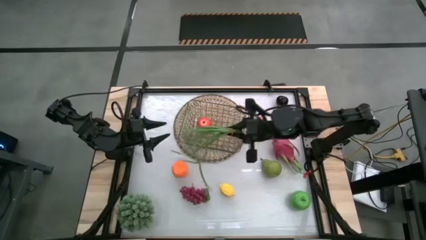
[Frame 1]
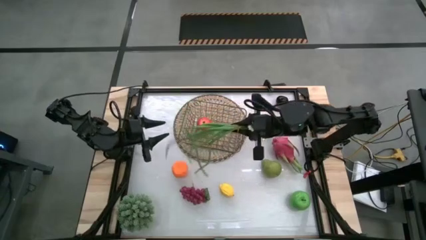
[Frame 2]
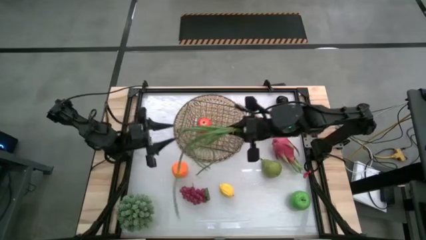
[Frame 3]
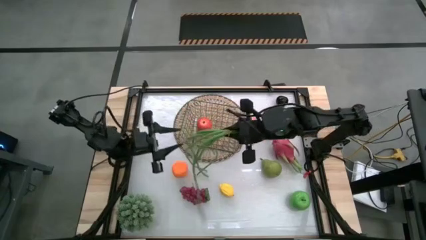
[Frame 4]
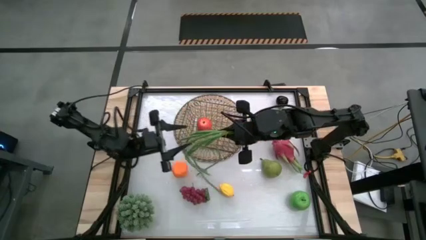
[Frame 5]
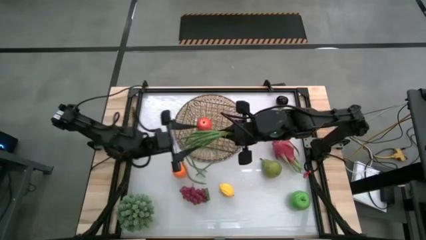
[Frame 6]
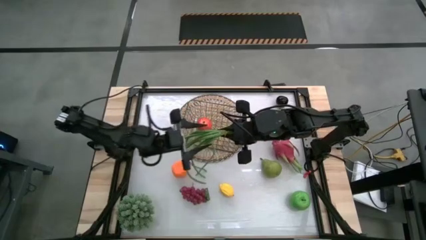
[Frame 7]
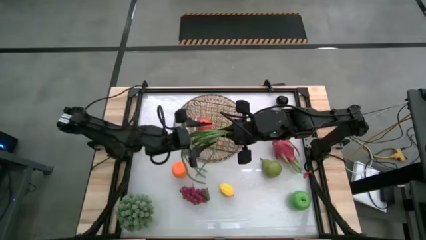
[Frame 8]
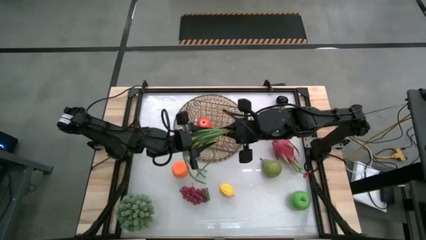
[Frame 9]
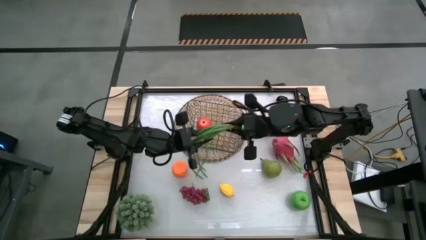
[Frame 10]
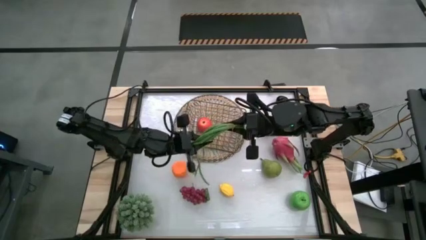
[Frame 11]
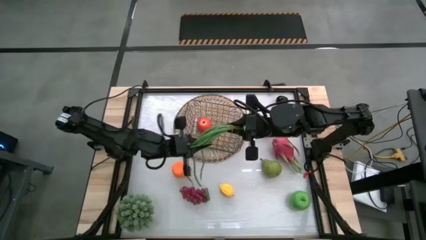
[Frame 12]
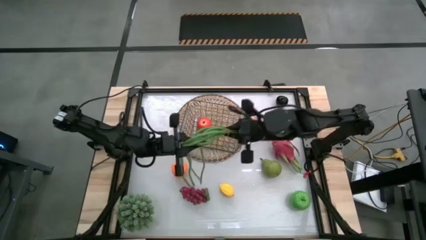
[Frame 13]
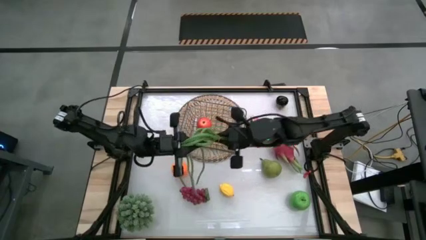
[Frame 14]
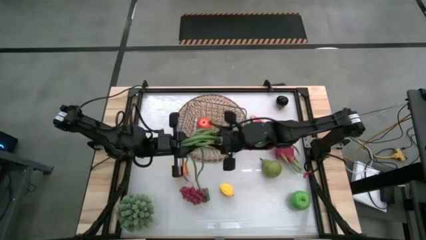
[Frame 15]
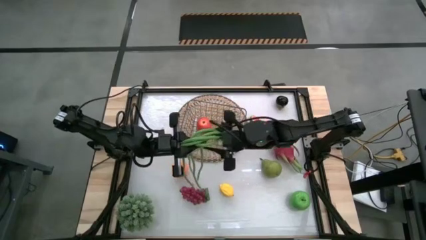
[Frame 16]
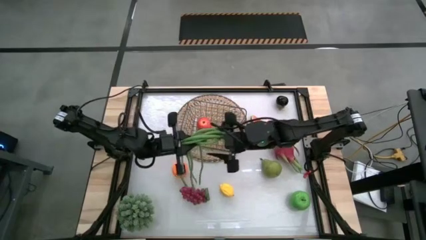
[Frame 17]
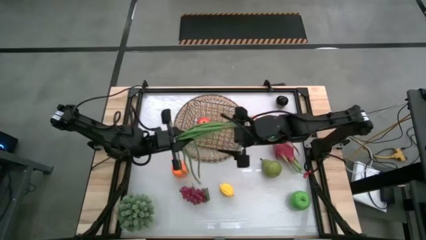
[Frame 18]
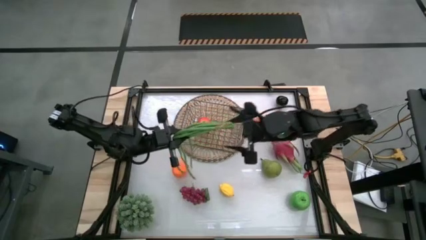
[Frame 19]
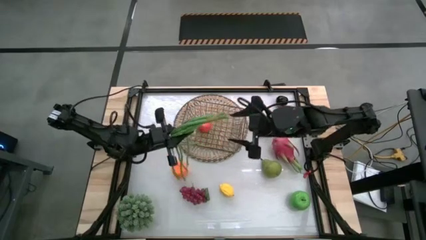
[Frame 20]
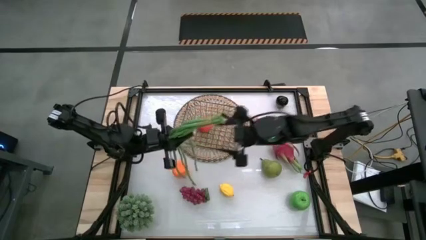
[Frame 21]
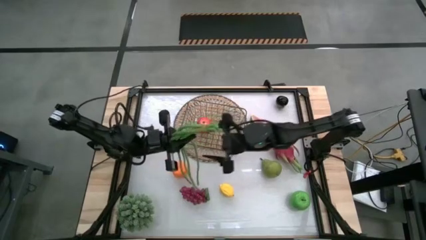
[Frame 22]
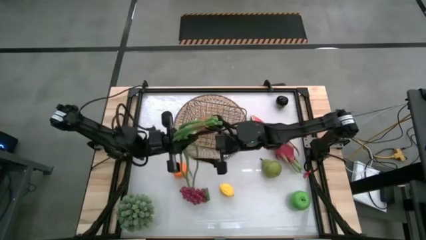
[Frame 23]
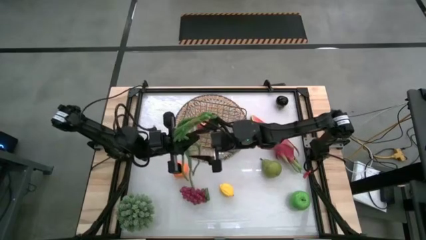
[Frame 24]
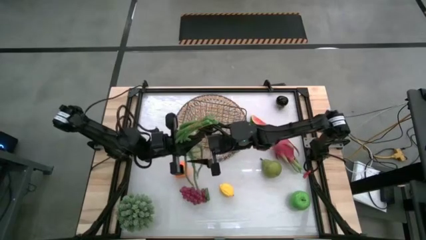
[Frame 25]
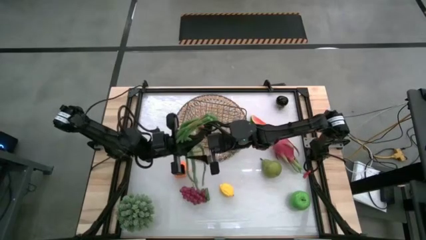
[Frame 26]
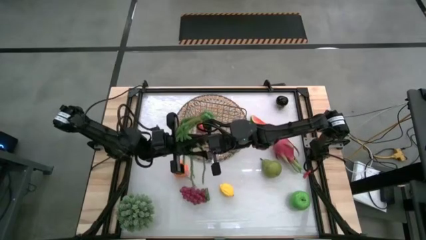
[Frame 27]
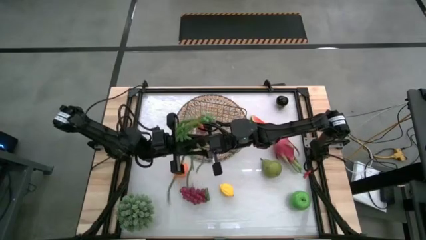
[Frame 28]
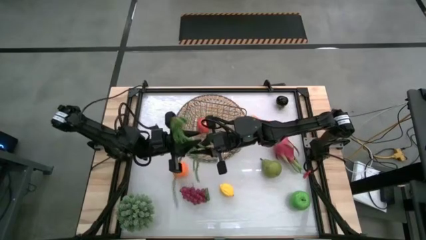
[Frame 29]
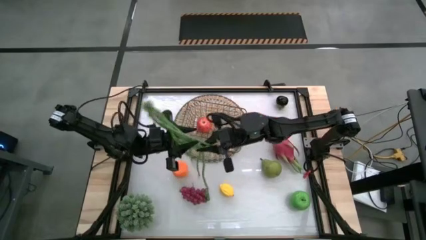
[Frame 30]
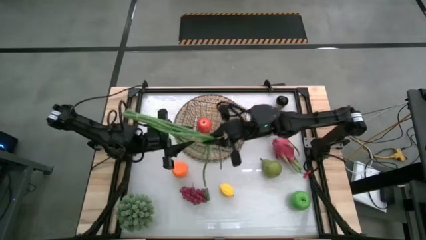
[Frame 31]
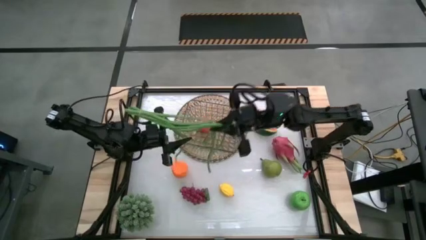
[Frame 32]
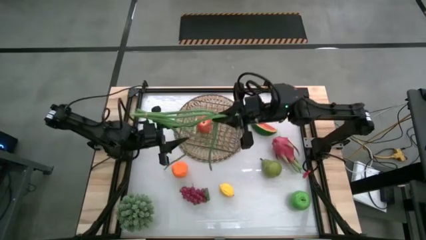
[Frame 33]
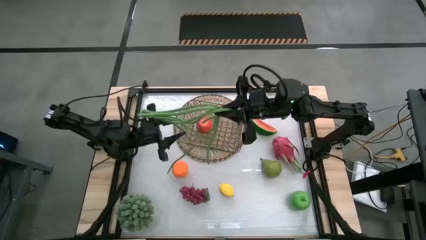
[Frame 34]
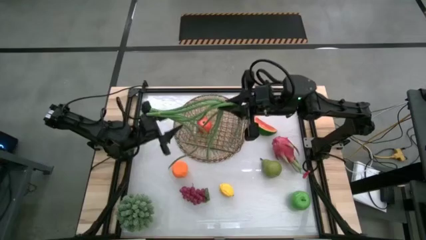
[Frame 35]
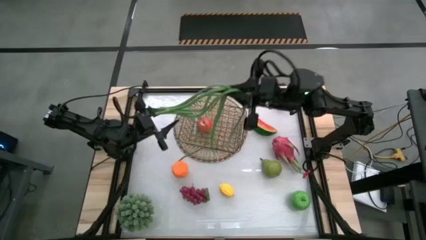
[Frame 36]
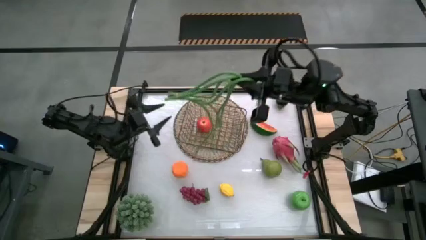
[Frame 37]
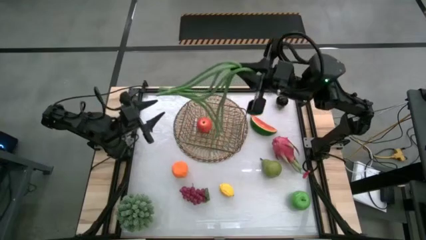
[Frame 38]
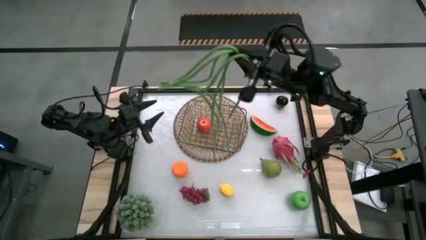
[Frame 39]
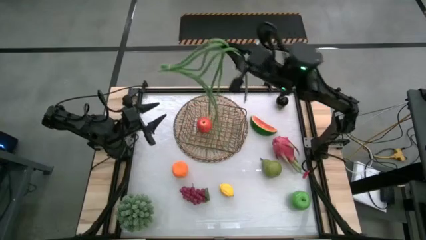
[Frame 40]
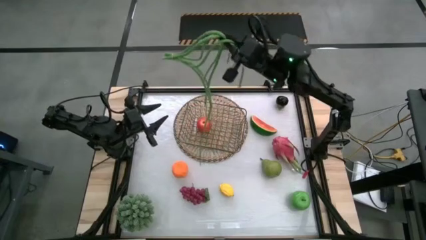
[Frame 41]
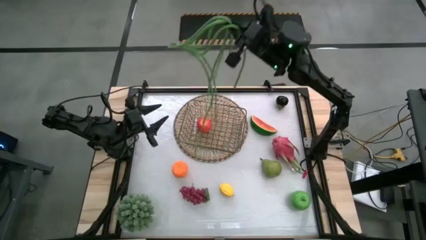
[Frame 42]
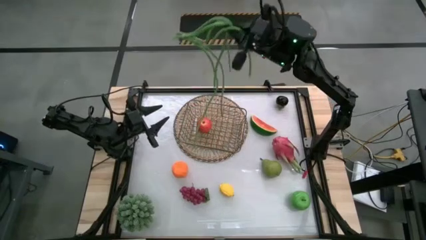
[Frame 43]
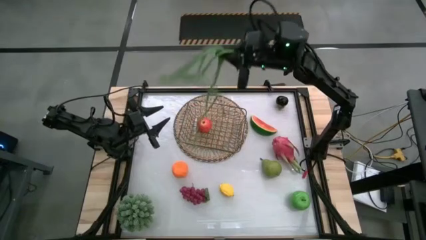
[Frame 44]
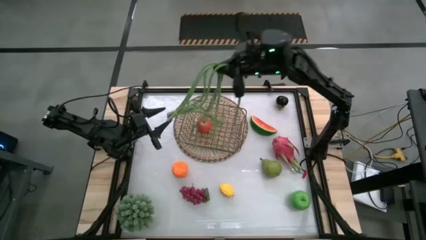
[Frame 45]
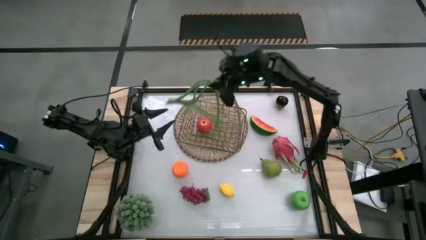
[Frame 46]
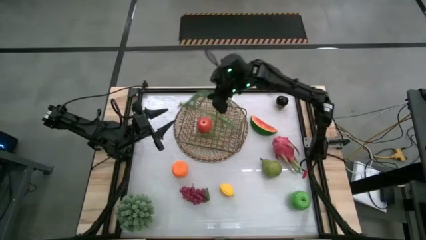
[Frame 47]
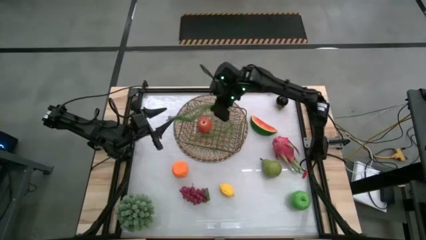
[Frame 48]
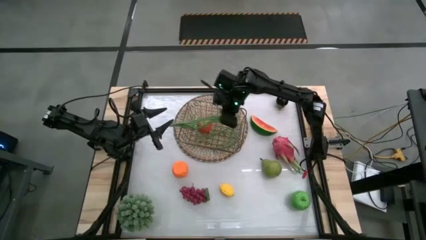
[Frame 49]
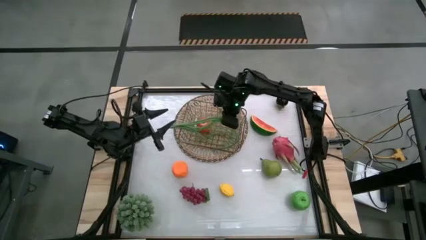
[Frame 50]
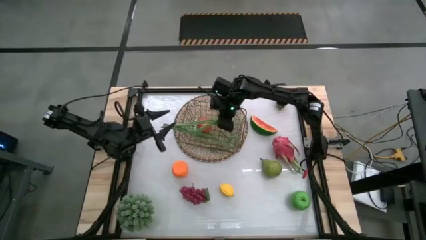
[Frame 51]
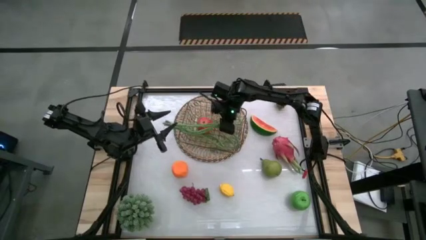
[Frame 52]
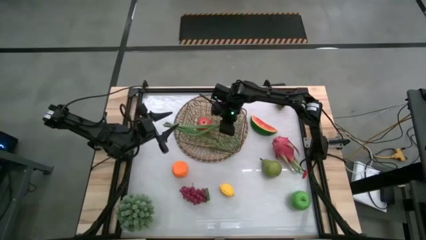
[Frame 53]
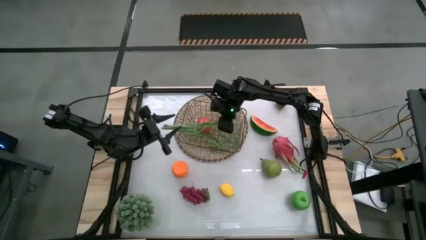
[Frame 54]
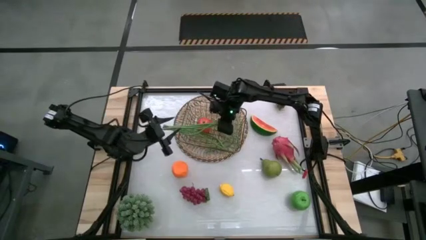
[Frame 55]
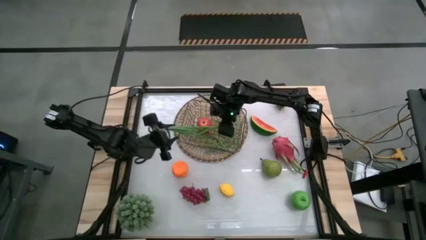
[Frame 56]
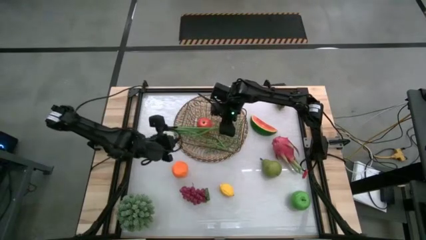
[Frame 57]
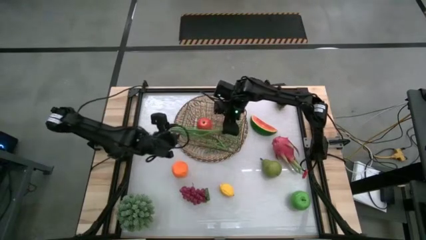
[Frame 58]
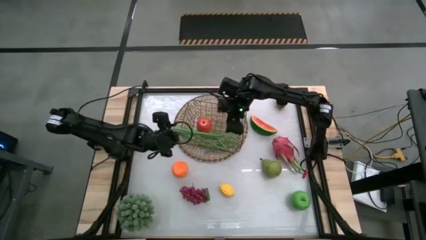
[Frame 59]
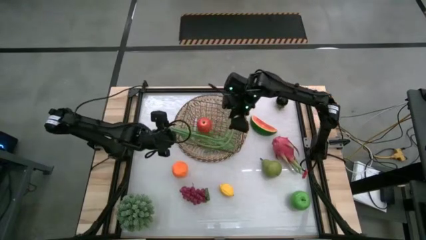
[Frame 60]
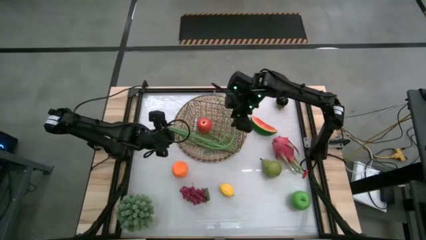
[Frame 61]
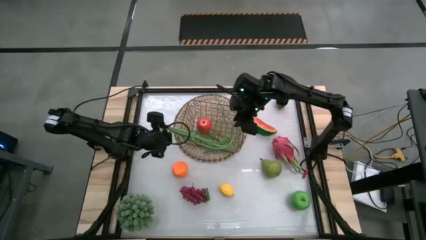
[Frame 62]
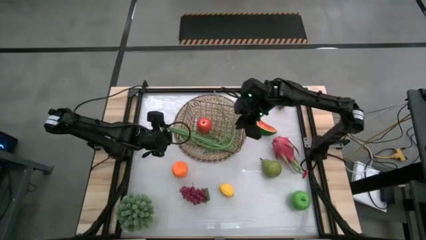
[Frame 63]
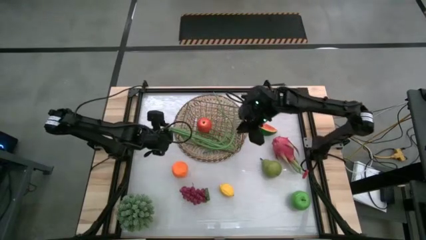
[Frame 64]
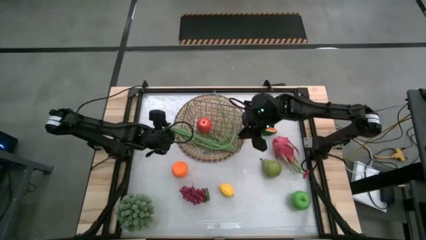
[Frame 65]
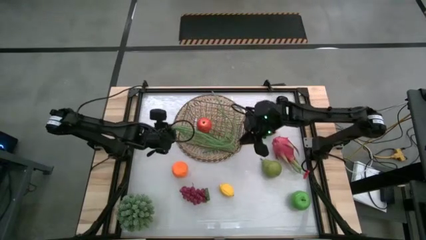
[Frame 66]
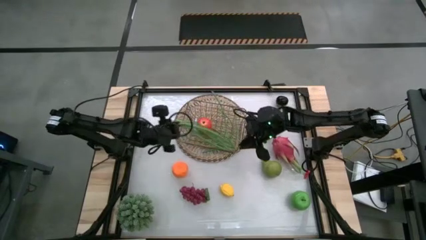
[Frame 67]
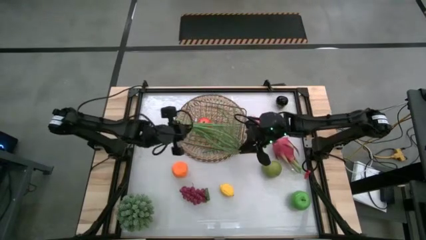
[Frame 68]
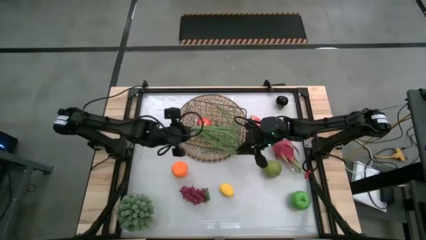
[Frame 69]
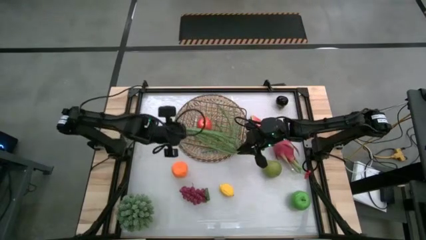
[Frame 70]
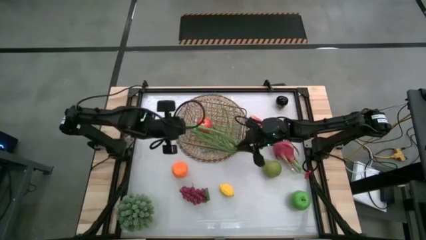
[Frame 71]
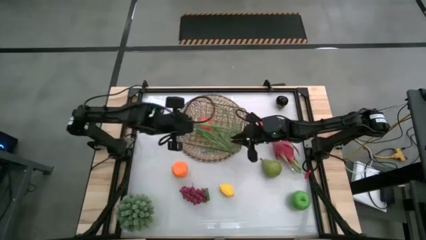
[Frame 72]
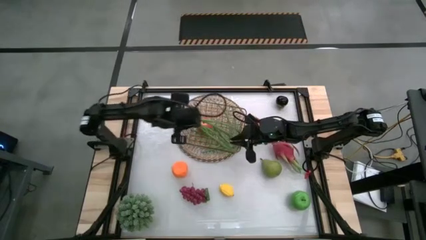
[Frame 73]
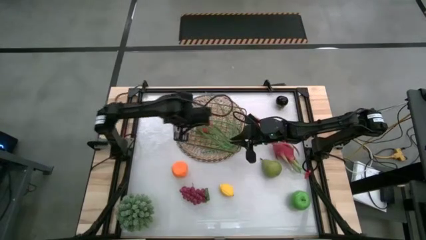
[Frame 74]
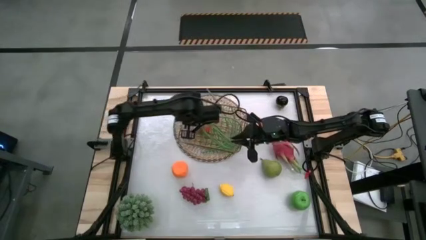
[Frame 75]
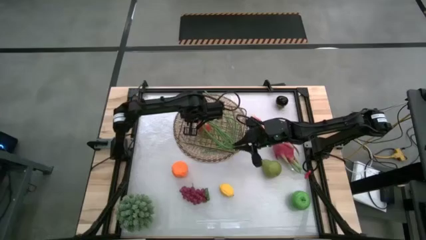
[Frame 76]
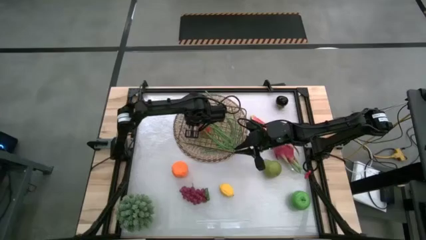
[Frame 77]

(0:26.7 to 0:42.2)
Task: Build produce basket
Put the string beans into the wire basket
